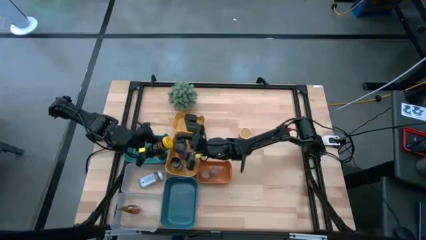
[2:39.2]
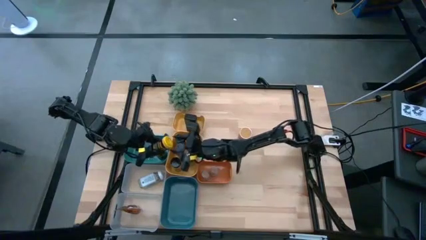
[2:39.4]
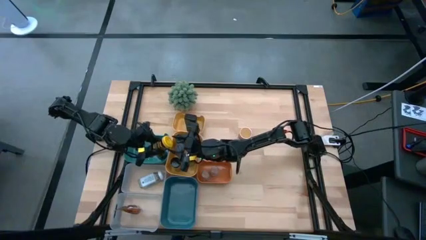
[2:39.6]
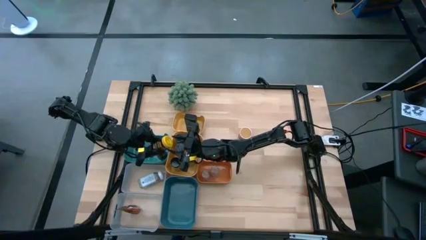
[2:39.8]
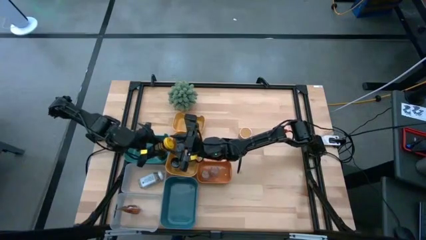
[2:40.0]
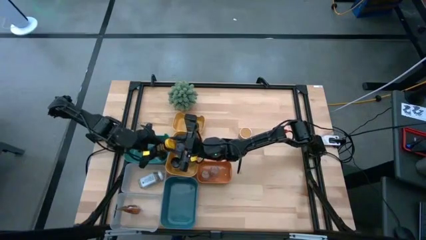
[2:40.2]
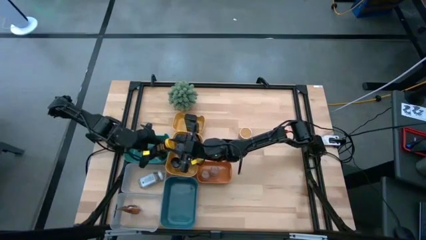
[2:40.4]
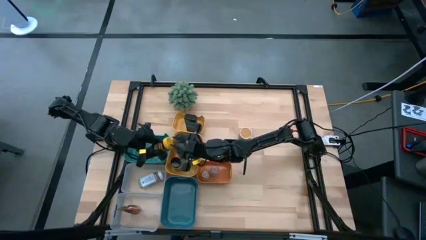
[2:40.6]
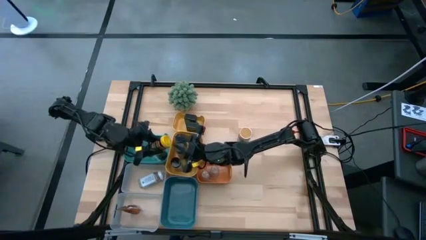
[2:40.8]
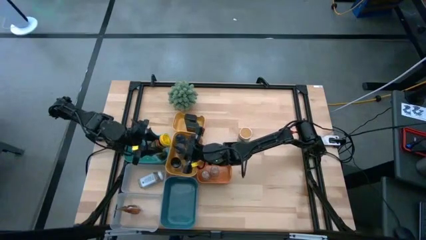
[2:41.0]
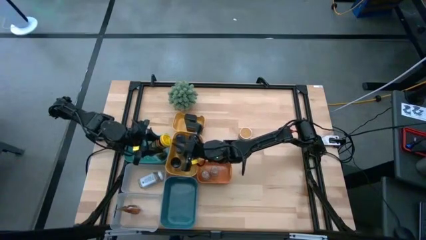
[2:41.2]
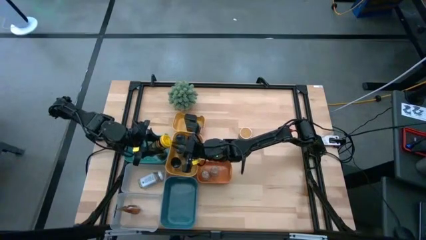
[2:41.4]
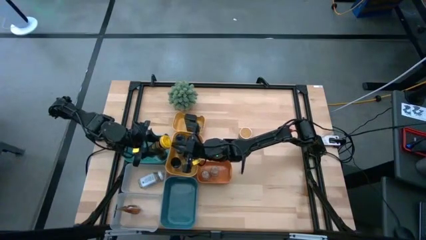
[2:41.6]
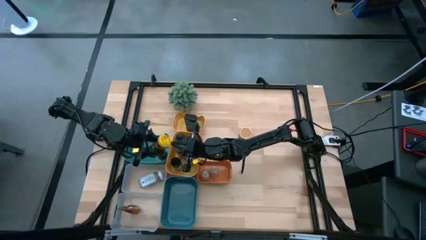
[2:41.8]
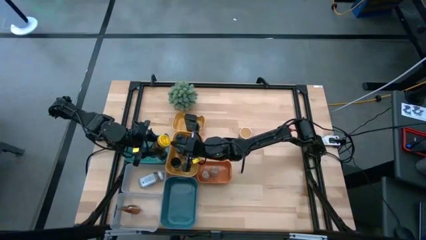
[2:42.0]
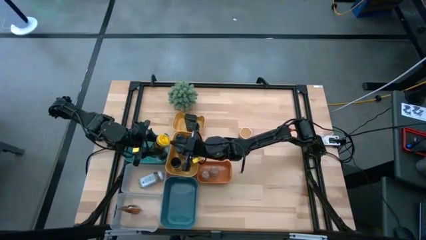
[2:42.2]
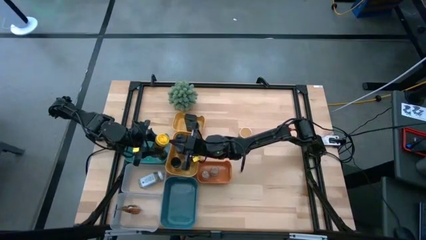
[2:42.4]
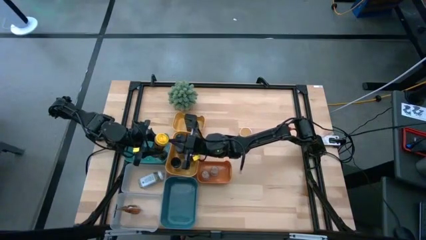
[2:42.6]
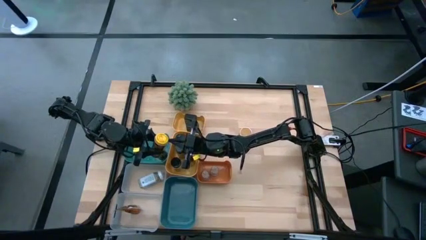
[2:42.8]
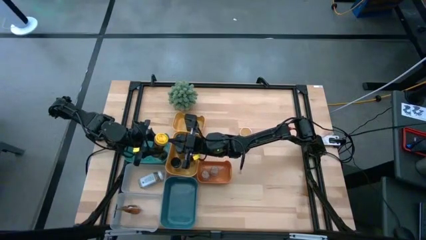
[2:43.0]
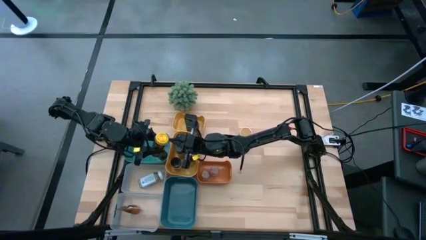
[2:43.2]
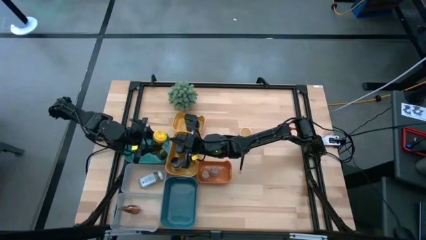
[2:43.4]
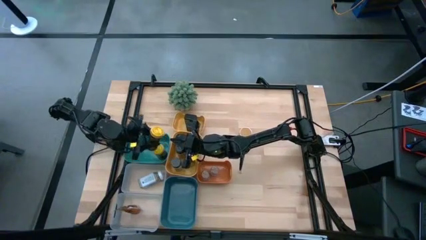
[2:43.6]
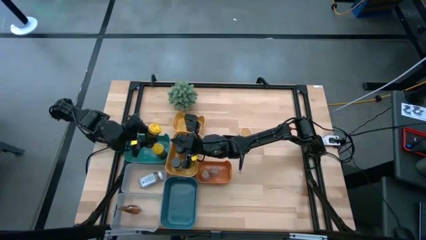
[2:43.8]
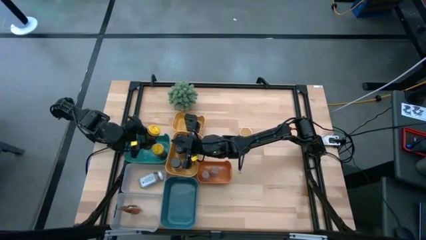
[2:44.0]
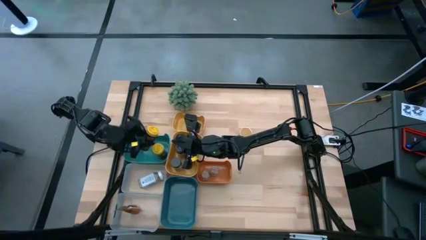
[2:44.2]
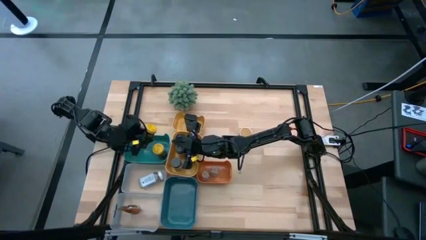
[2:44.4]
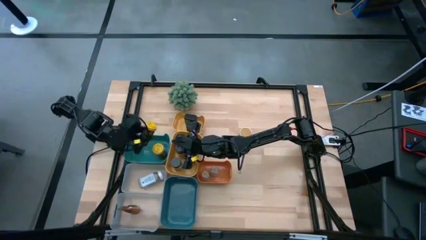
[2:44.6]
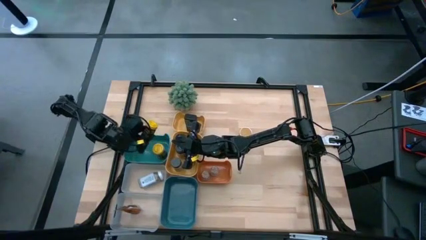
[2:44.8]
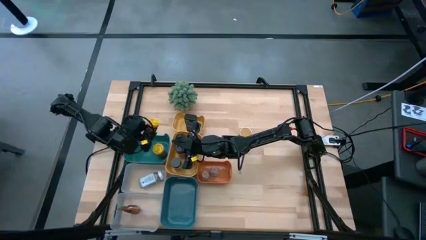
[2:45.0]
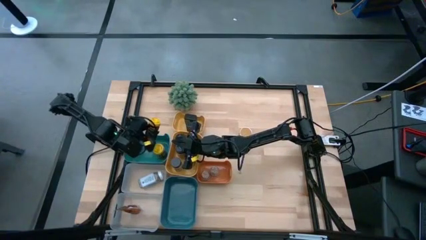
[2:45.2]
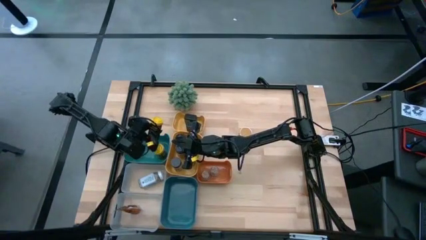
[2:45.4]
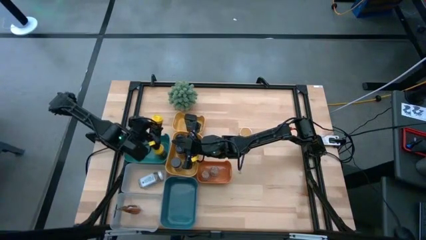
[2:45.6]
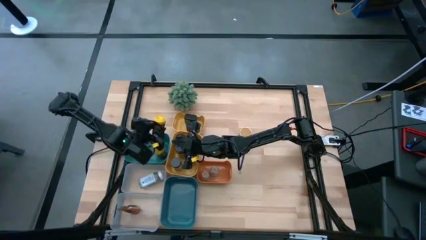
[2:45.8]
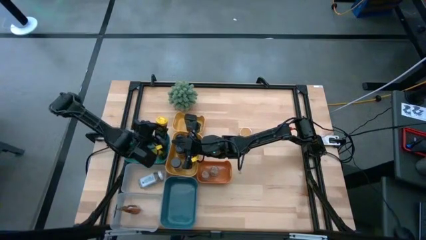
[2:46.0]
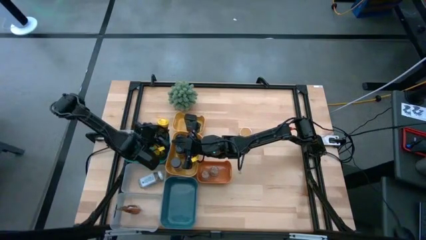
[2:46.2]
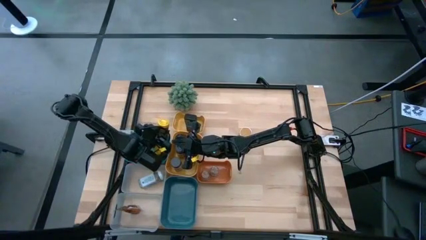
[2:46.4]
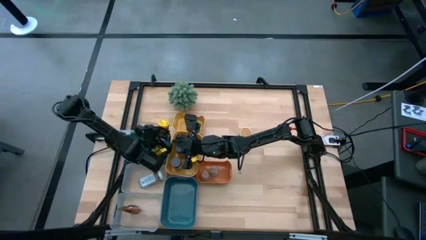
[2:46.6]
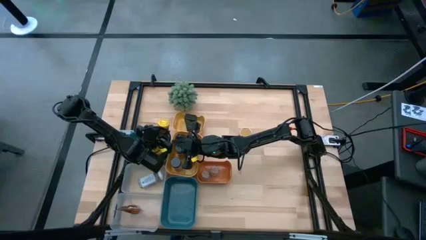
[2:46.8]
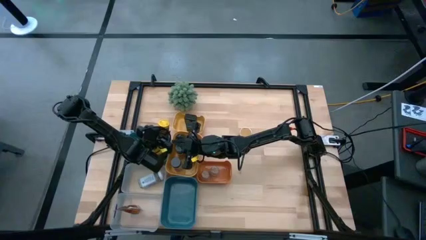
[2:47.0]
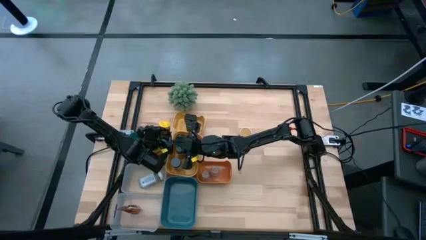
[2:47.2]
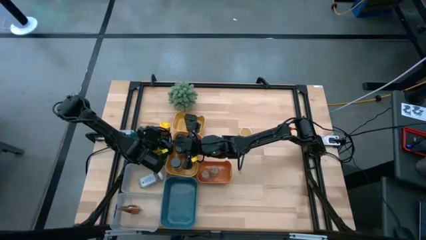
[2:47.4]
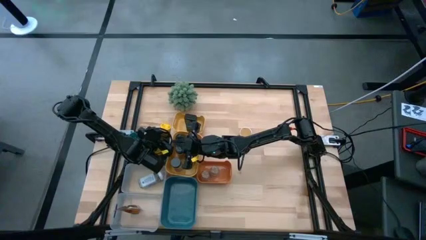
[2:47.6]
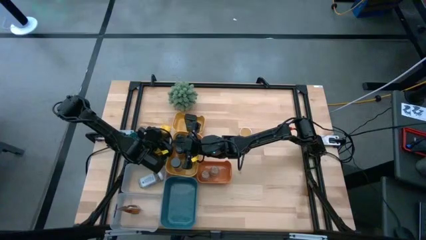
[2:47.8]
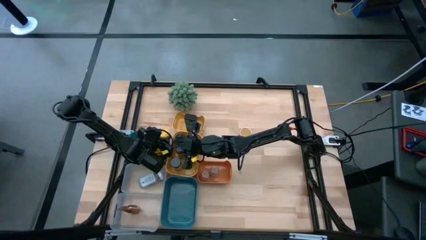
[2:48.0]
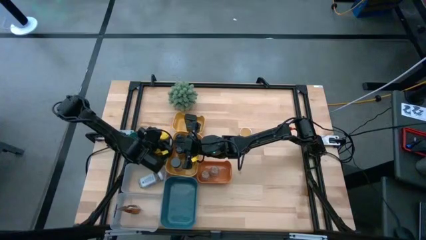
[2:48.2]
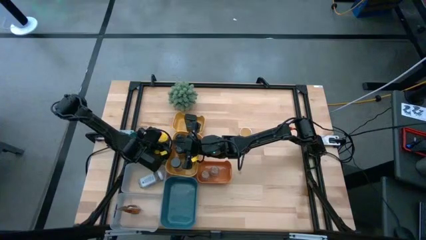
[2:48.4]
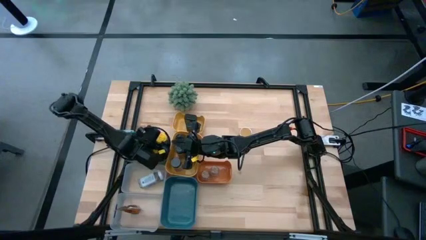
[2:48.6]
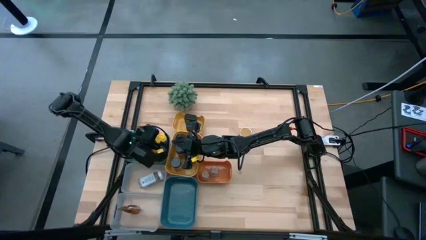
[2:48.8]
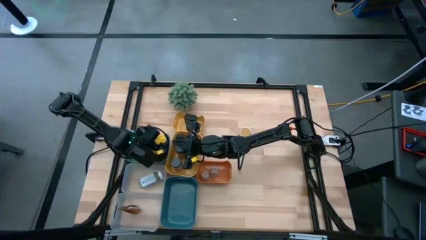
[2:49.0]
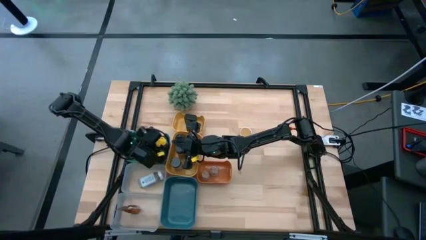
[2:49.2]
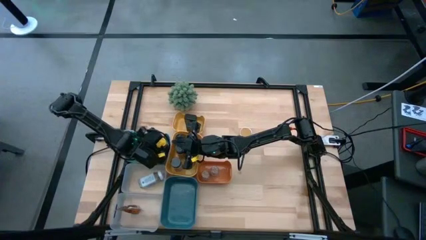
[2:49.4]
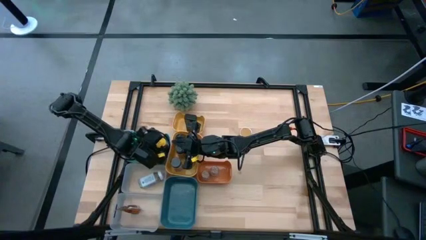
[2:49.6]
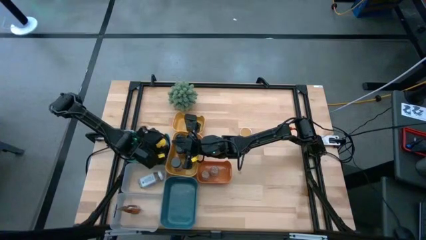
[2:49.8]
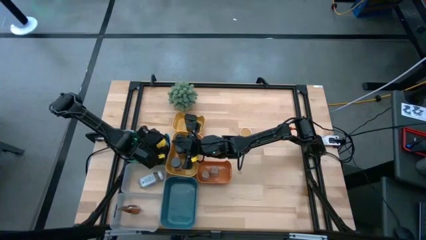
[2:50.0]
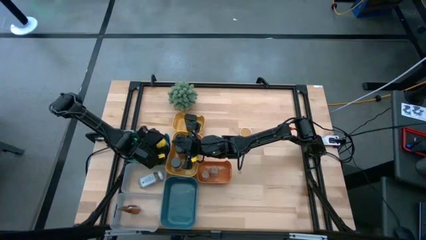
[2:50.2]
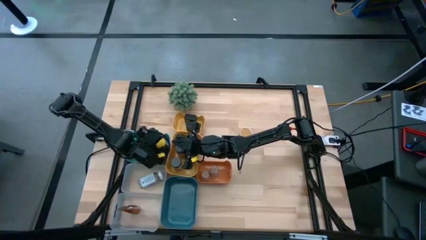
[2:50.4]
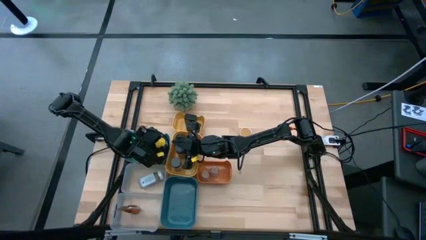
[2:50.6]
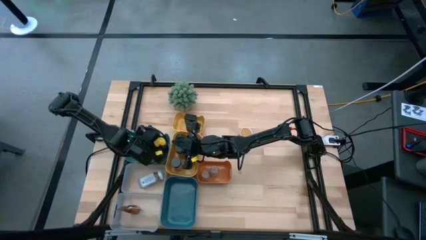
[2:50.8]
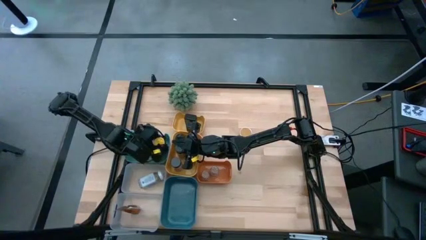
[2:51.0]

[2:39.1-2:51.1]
Task: Sort spices by type
Put the yellow seasoning bottle into the green bin
